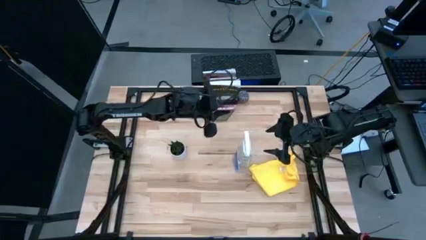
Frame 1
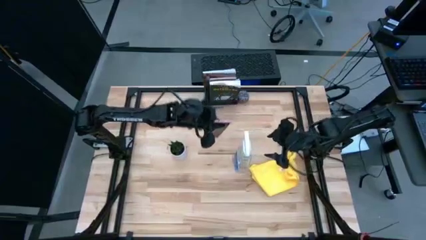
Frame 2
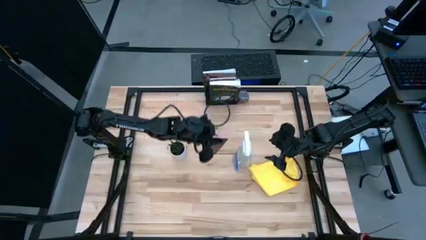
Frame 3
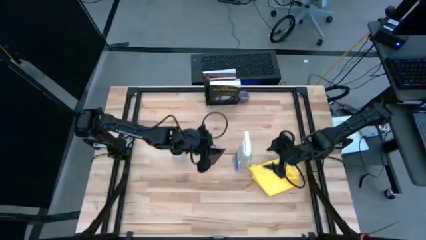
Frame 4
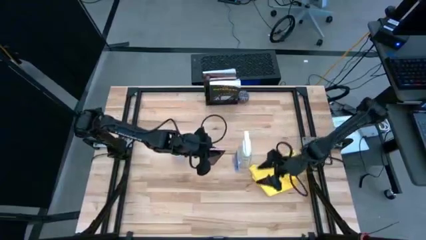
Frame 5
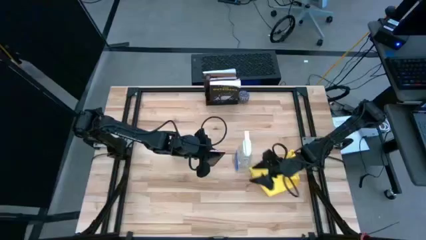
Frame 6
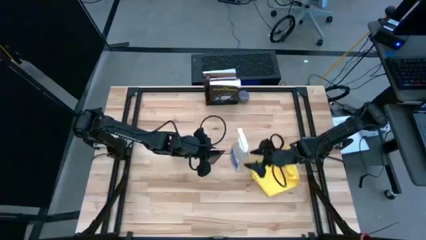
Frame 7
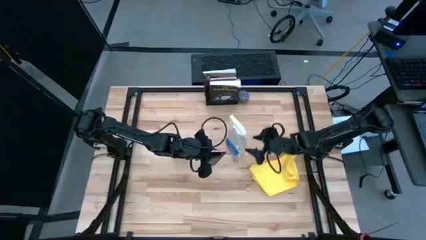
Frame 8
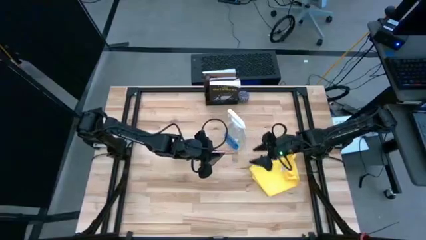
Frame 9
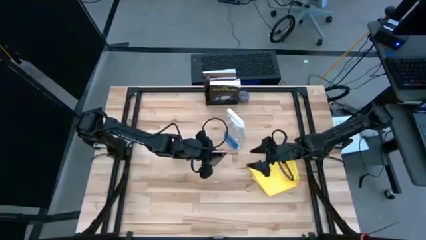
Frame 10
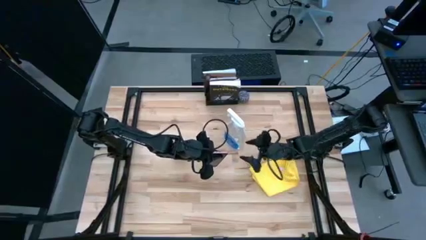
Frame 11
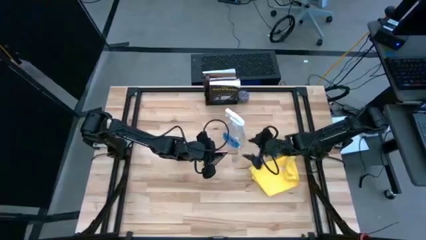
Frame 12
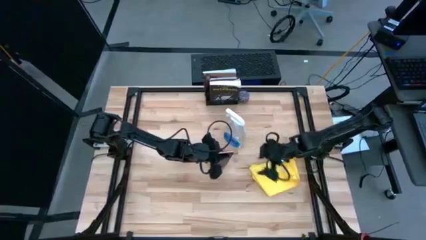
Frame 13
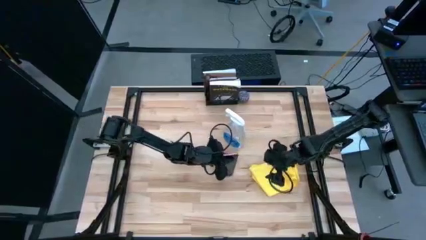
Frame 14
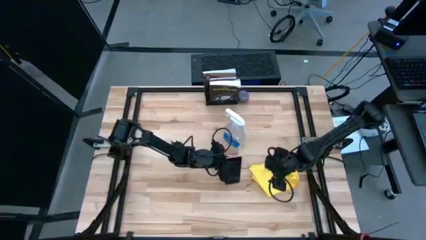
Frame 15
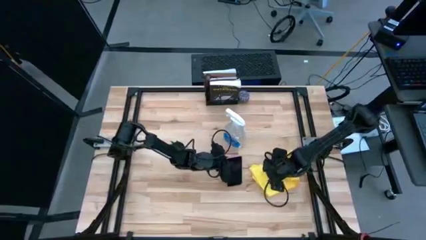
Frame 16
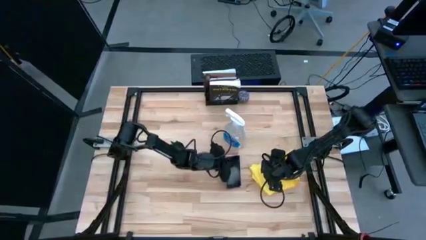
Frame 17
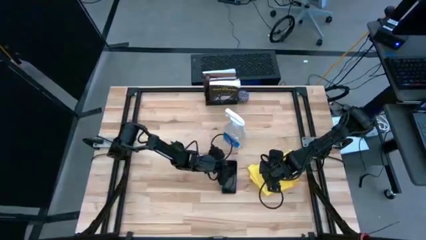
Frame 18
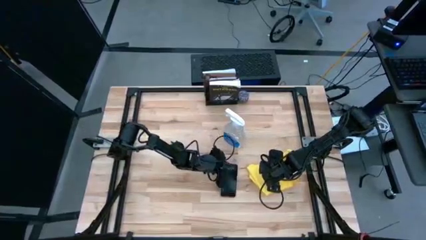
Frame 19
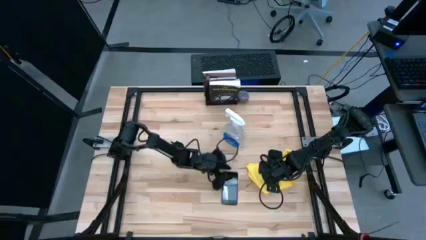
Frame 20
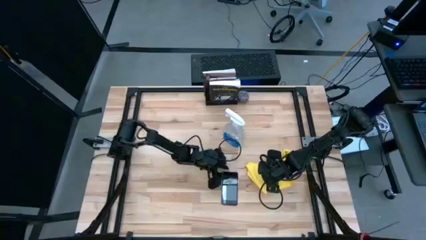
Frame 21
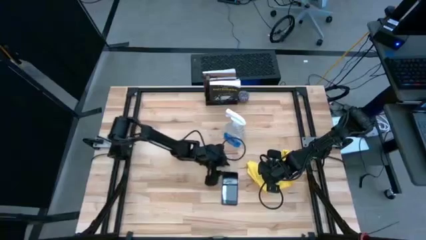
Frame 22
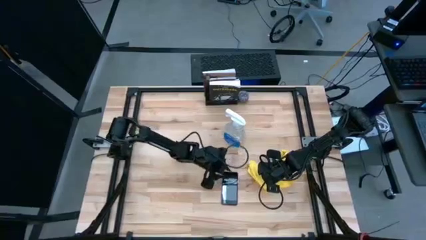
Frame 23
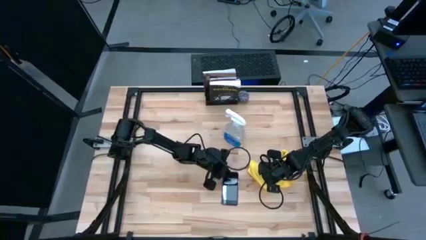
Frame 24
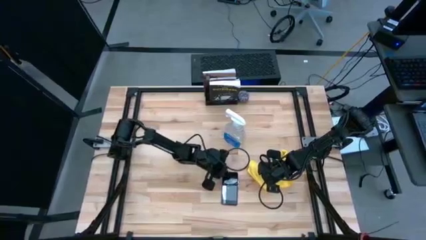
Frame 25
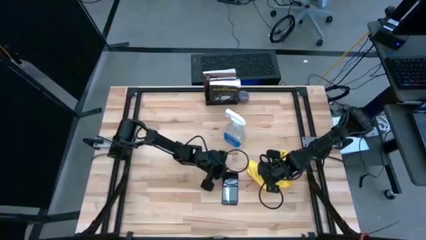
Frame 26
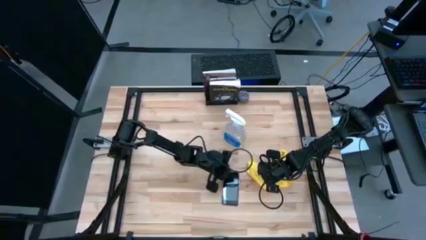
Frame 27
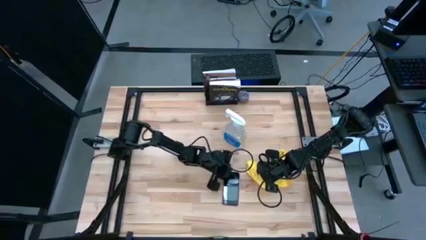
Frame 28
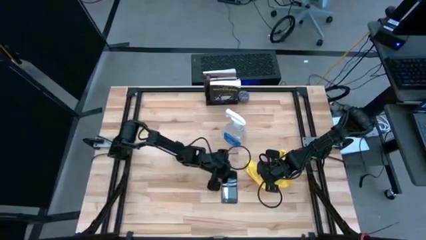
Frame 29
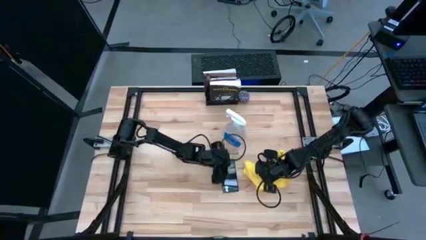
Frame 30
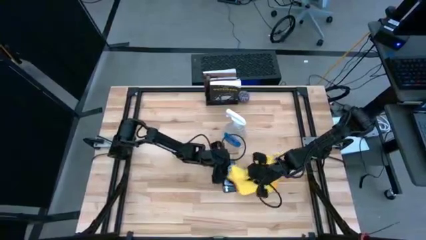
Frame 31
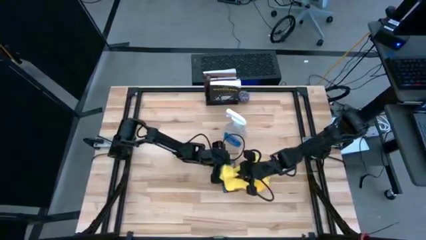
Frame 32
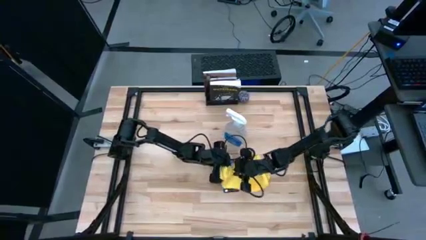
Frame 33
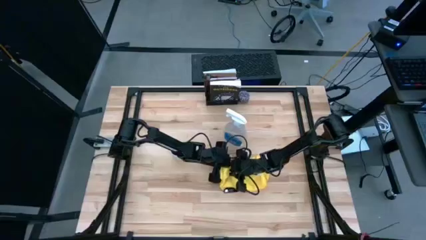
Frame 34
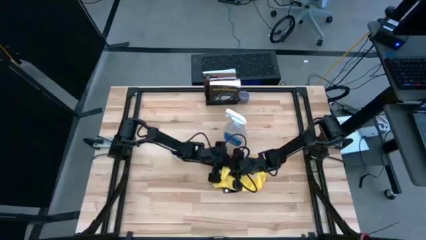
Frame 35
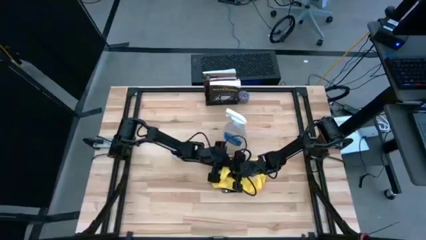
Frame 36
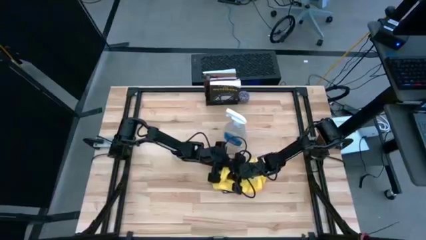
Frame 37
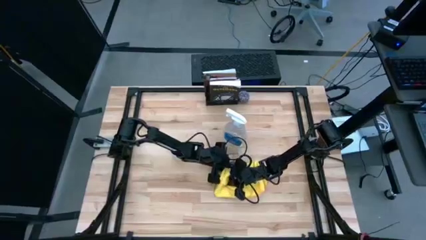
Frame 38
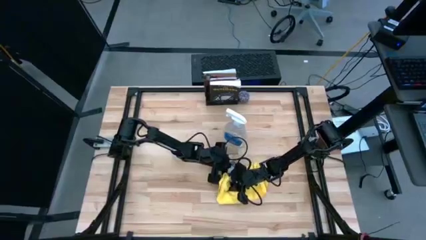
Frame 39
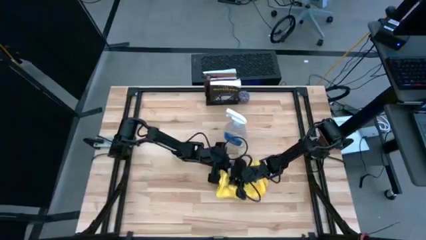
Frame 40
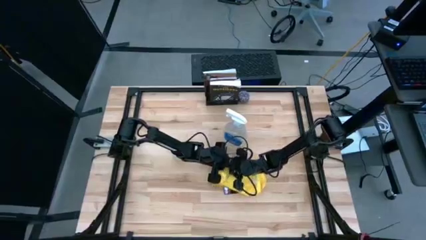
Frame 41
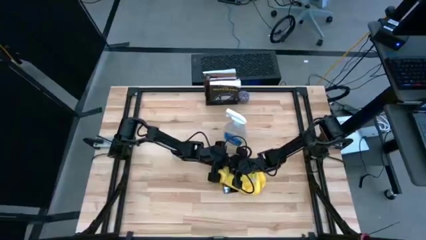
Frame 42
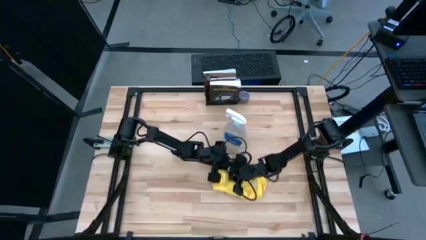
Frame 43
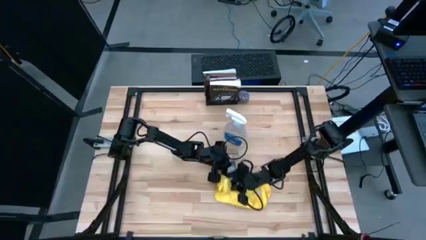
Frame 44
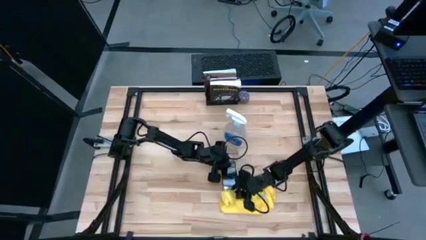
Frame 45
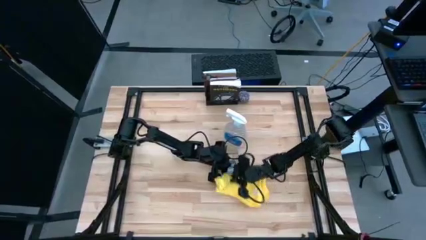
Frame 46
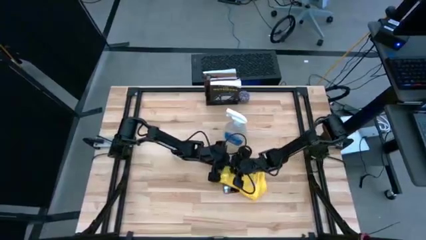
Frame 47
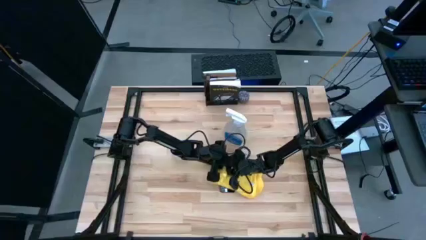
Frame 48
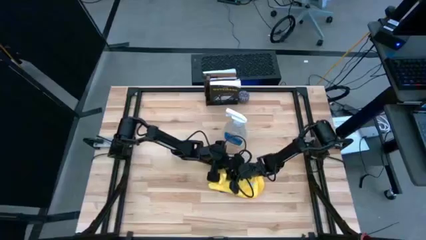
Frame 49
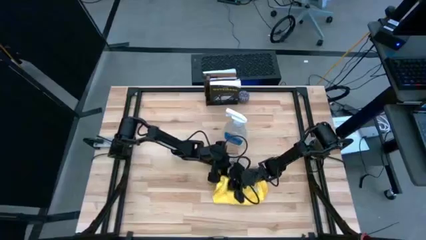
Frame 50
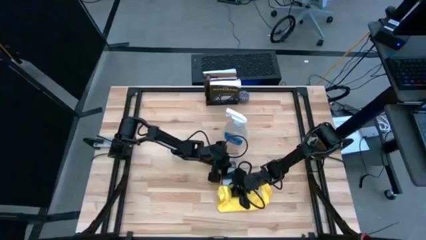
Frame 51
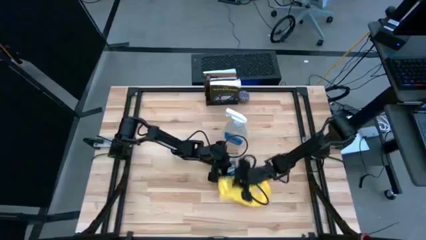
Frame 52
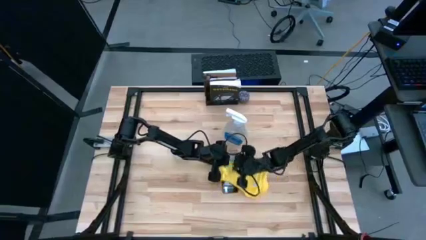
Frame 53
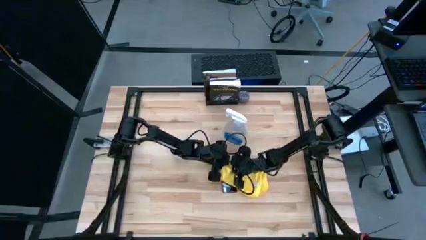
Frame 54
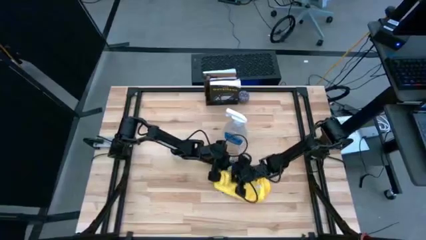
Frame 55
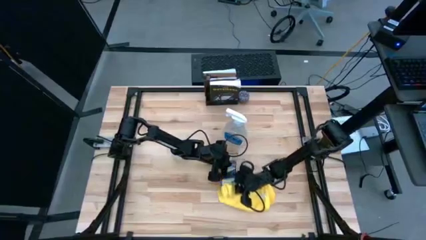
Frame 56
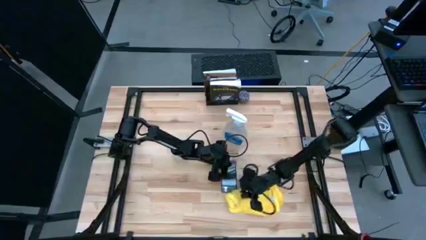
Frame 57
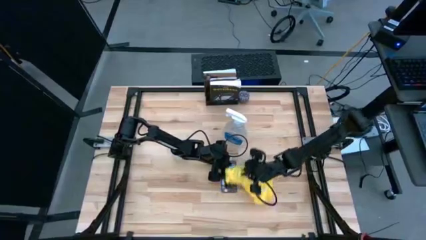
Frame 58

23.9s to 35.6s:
Task: Apply microfiber cloth
Wipe the front of the cellphone with a microfiber cloth
